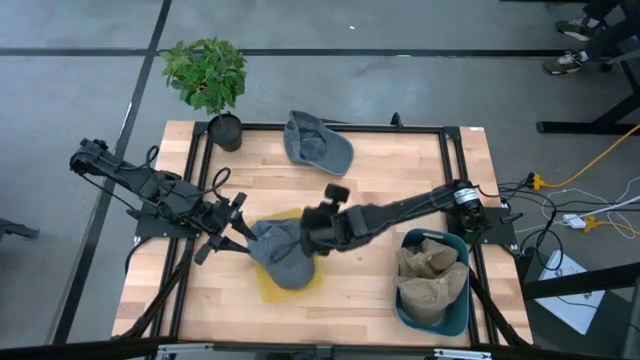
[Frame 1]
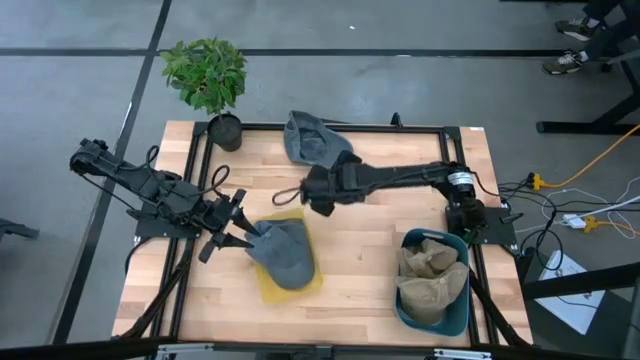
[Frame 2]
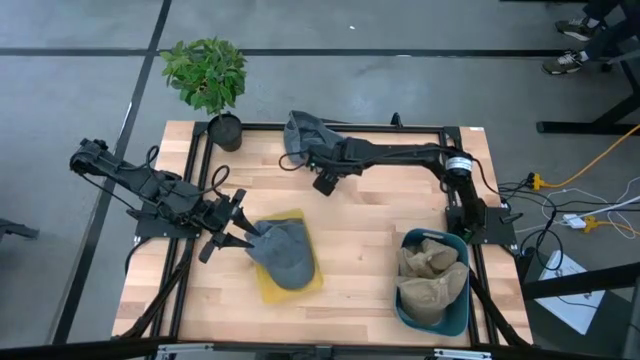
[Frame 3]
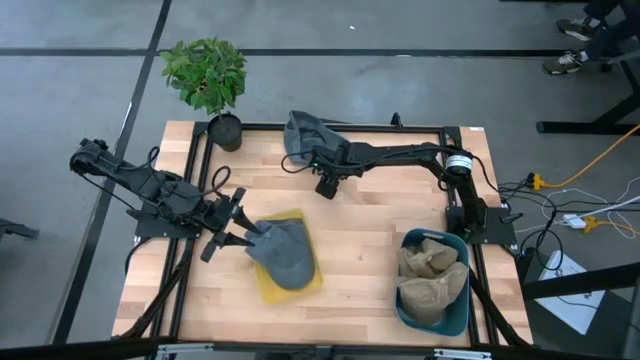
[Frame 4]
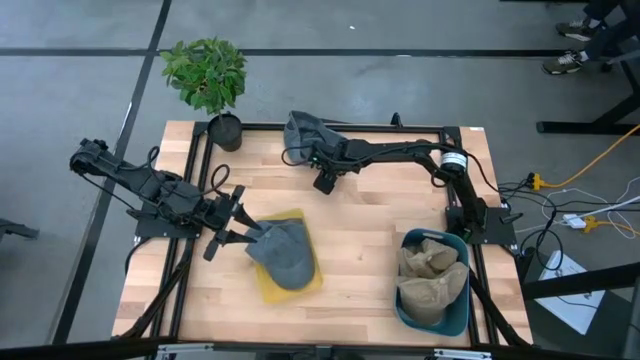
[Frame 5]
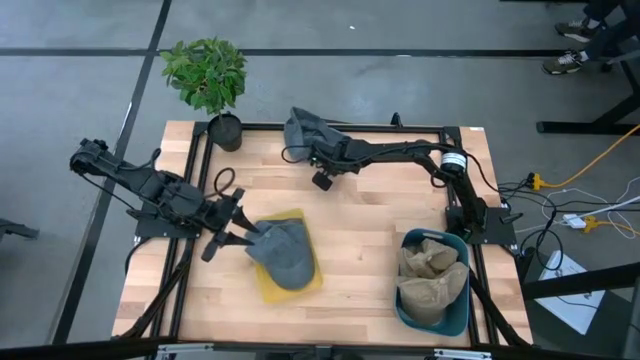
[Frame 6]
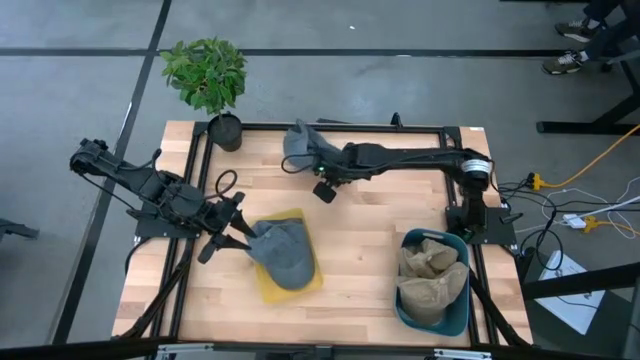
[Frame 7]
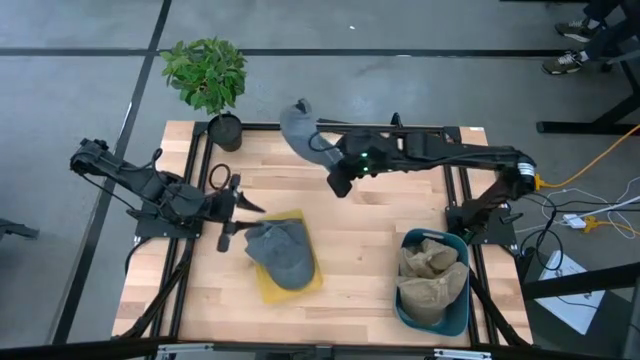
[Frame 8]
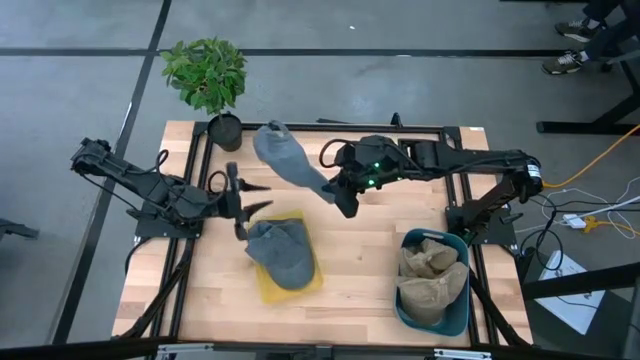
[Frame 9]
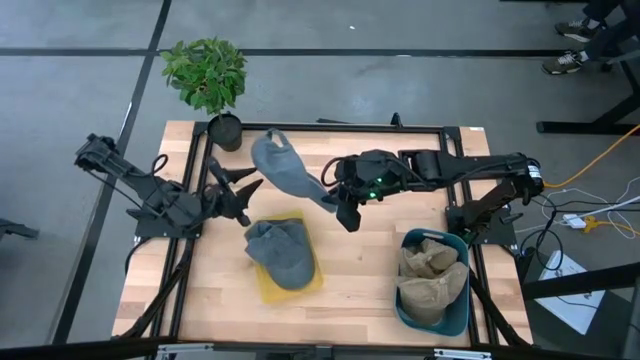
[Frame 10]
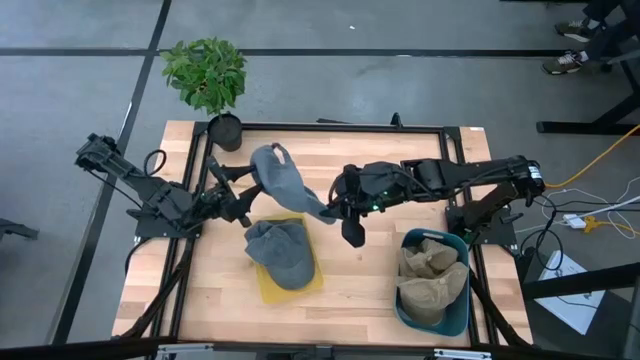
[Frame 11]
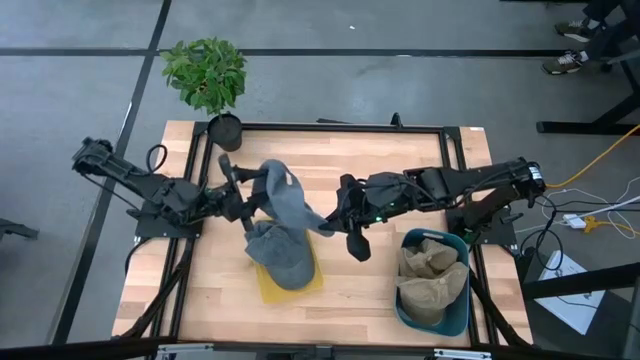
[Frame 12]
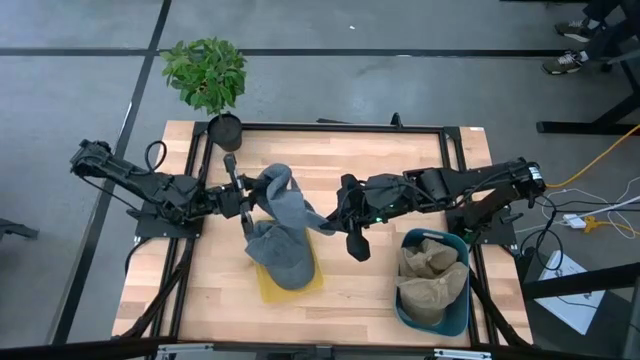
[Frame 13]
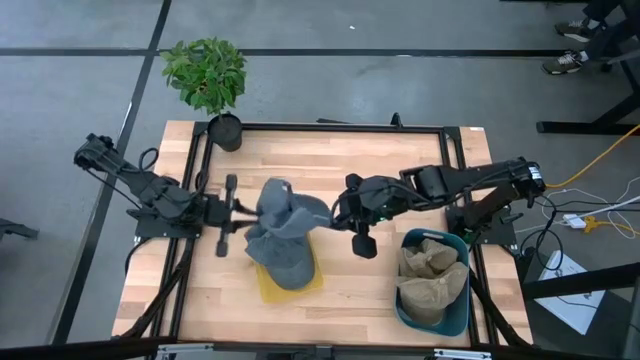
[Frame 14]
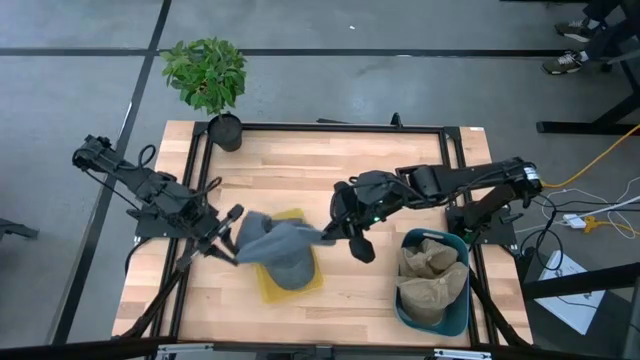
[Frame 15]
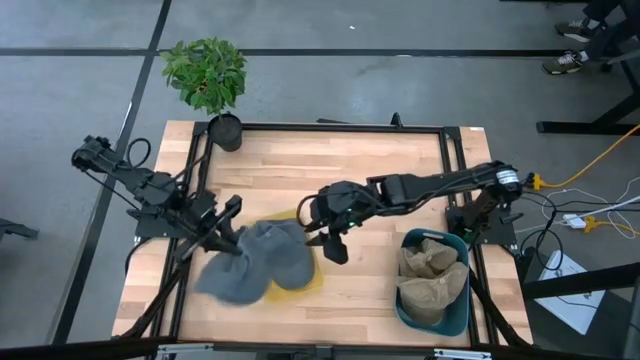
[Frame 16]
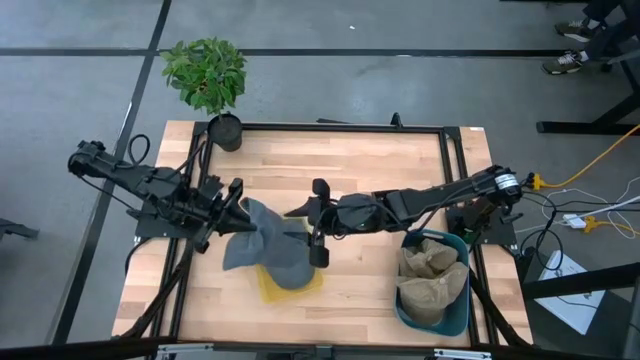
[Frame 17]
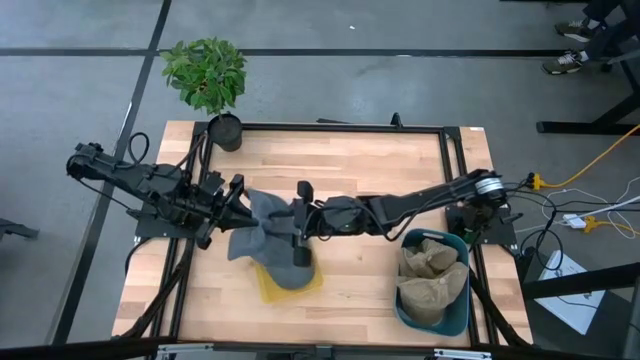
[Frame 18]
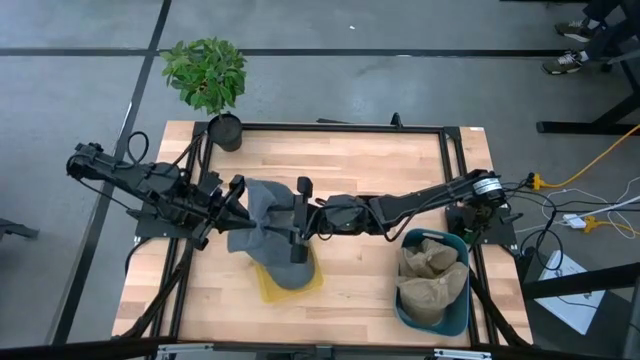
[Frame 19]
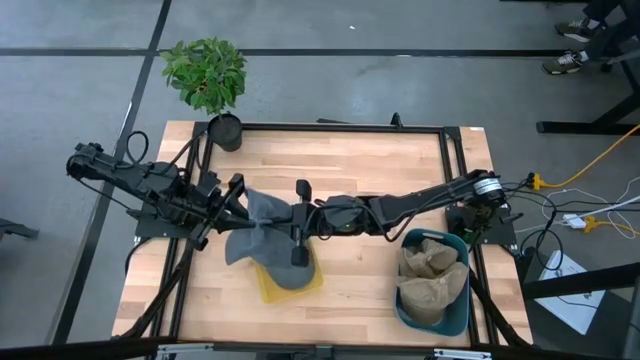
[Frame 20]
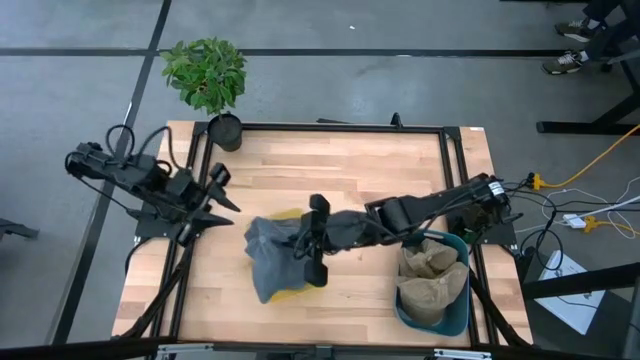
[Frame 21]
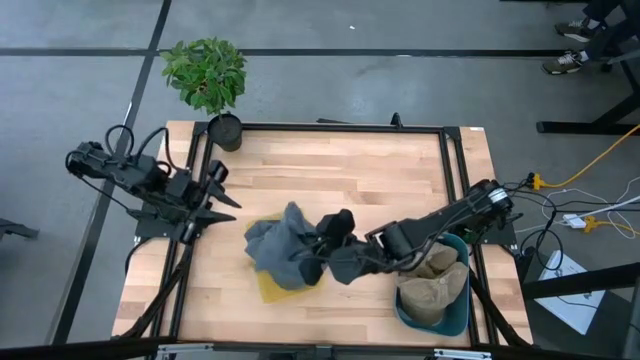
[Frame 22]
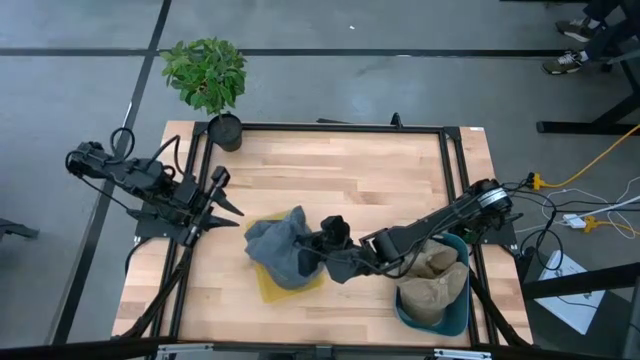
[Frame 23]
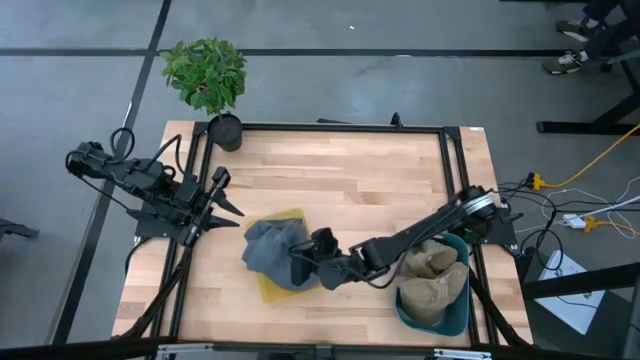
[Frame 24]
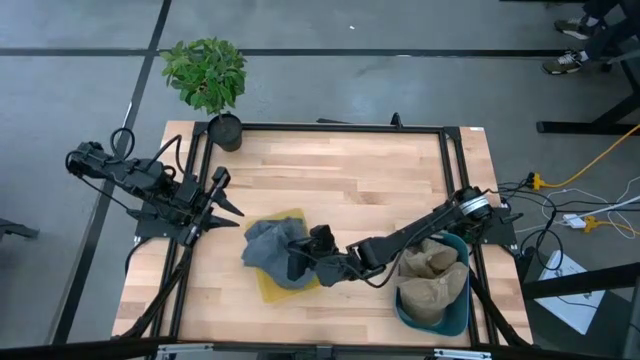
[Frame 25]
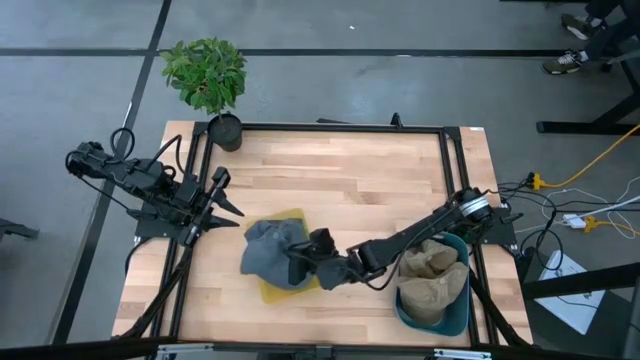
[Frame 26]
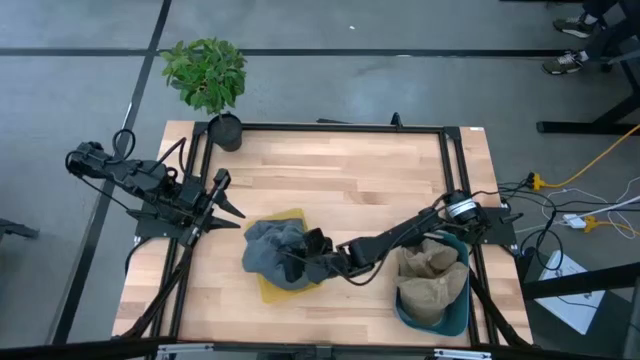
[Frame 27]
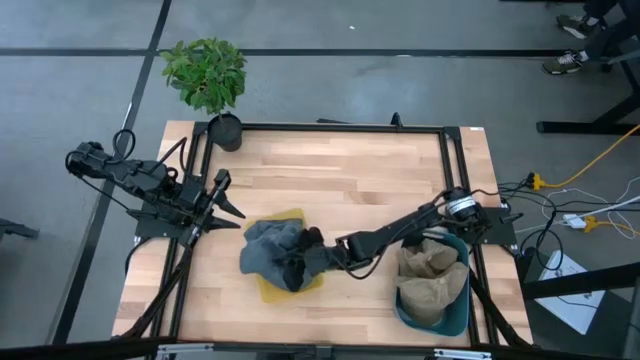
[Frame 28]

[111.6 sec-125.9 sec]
Task: Pick & Place hat
Put the blue cap into the yellow bin

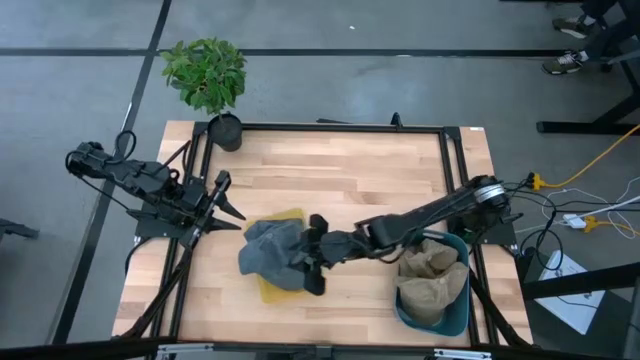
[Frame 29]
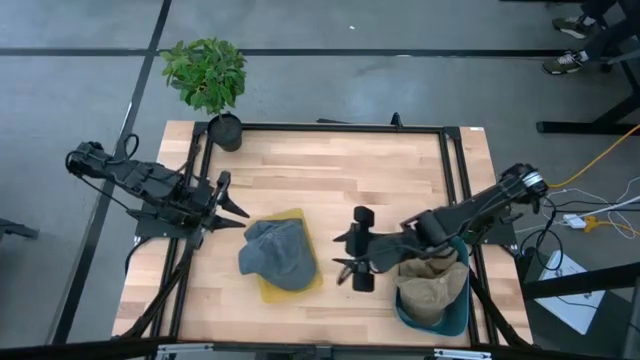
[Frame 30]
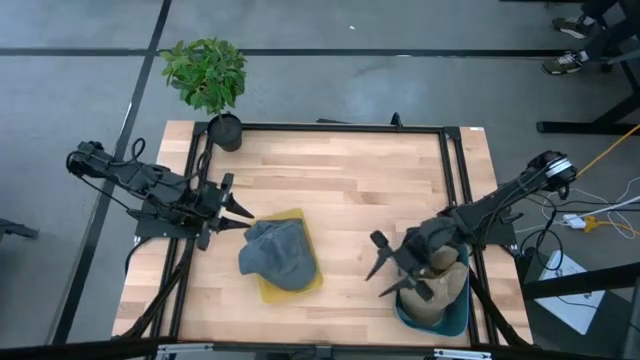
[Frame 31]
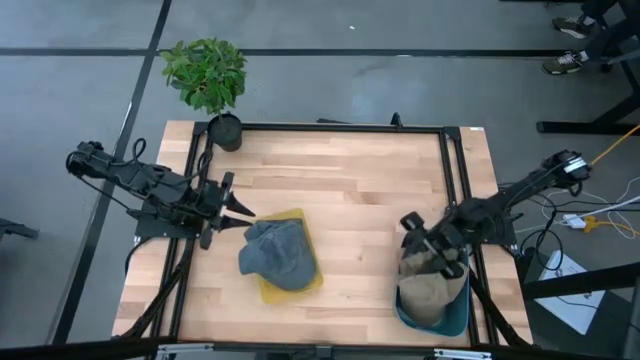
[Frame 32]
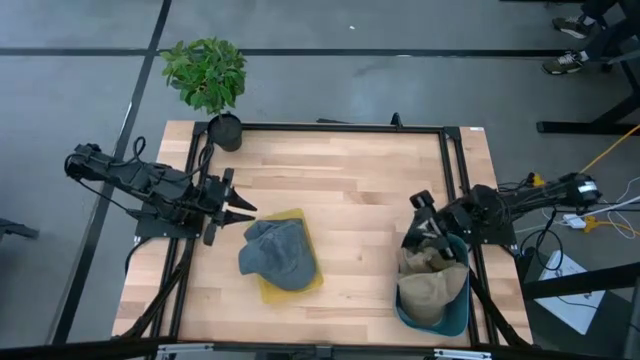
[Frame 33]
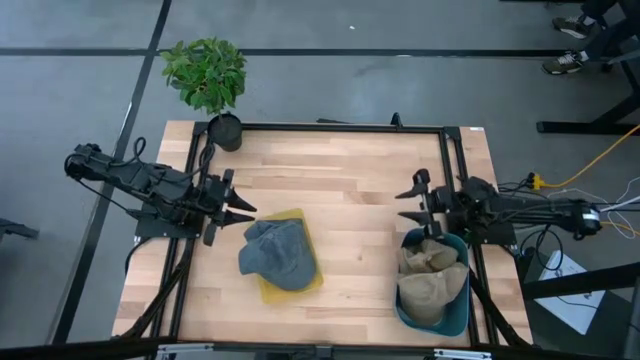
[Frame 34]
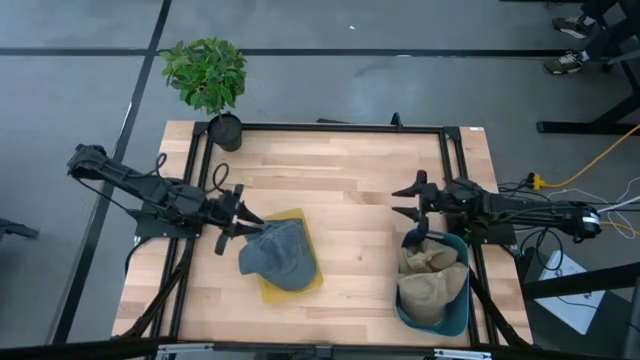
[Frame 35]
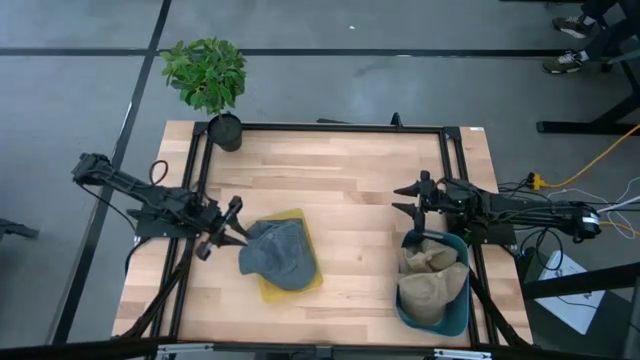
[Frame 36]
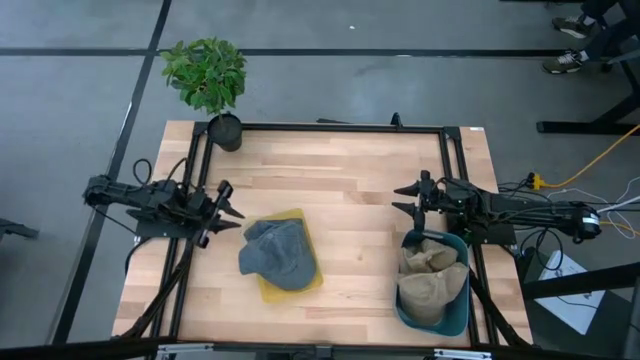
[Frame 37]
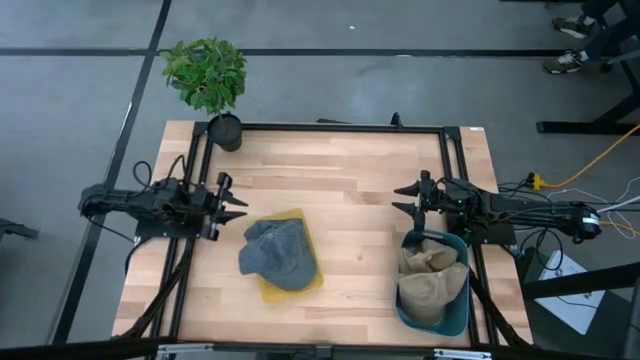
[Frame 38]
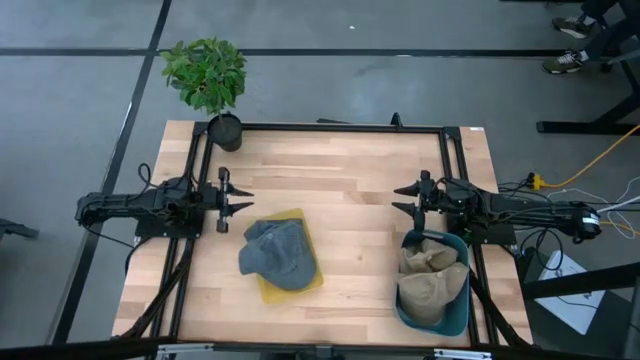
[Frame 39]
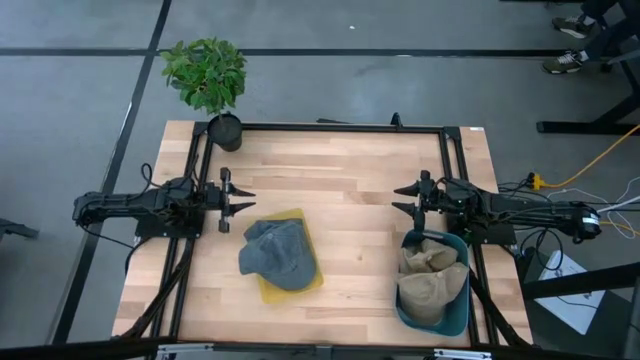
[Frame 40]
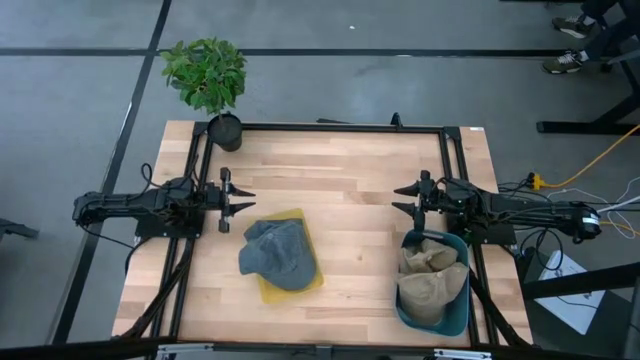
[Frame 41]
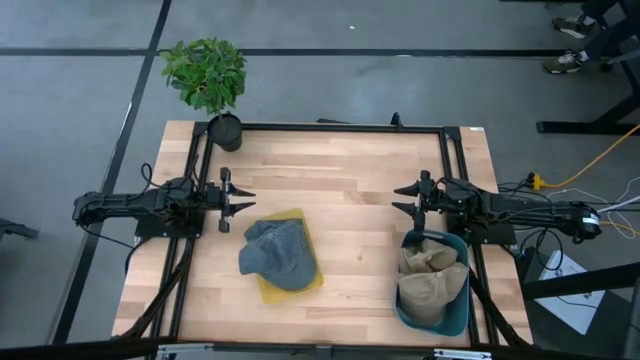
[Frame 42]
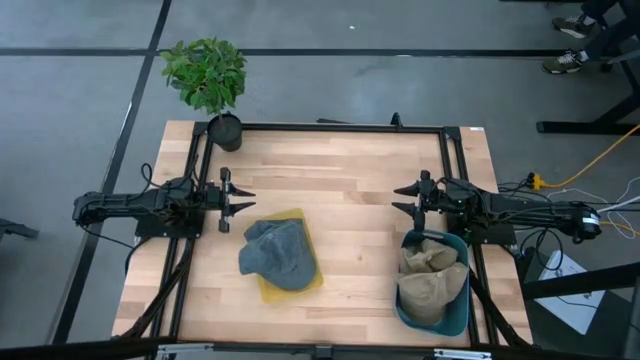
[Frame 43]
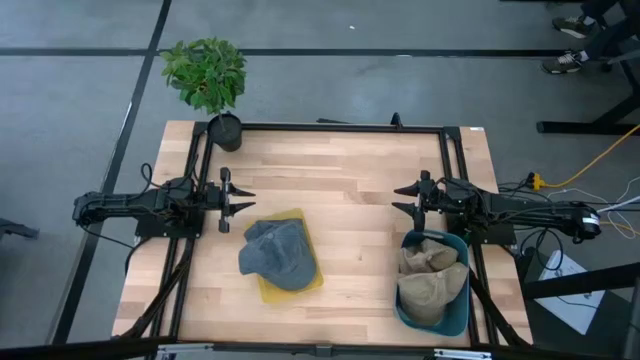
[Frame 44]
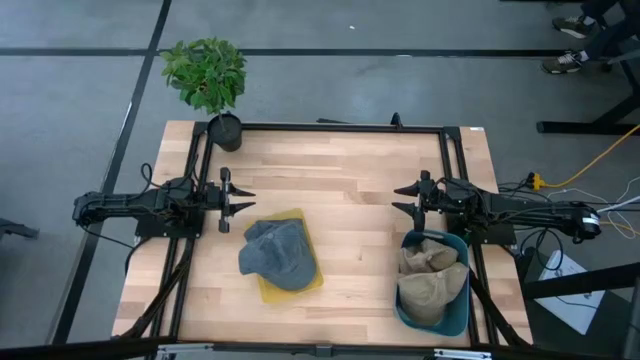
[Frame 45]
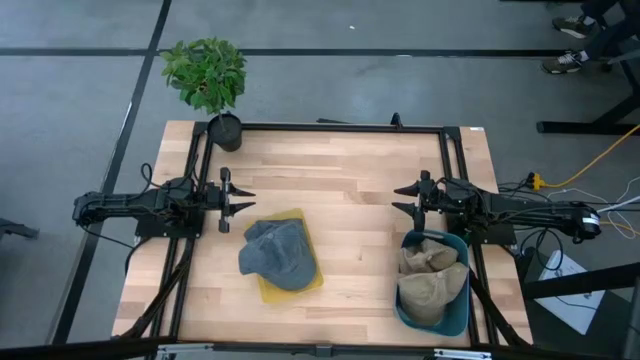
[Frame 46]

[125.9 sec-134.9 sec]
Return to Home Position
